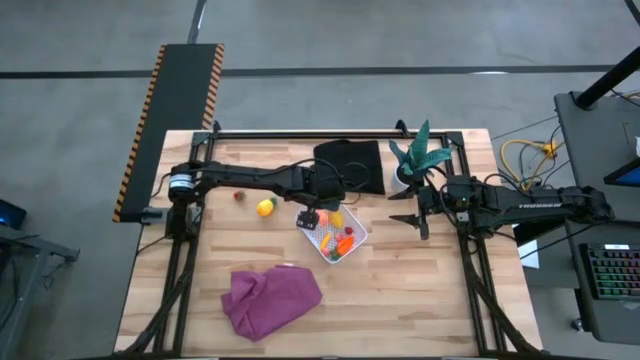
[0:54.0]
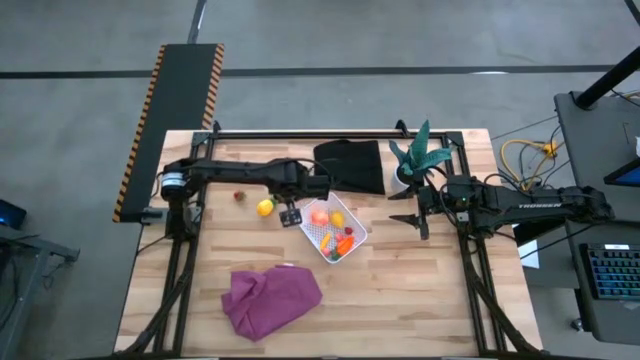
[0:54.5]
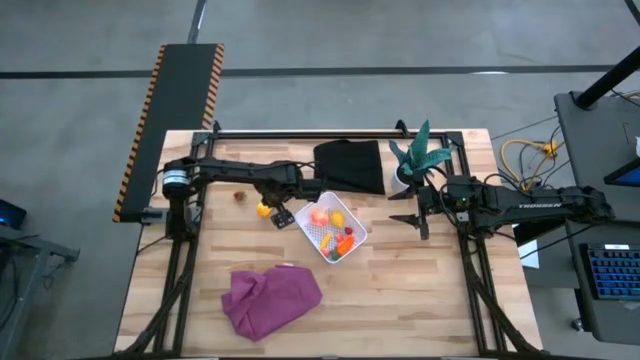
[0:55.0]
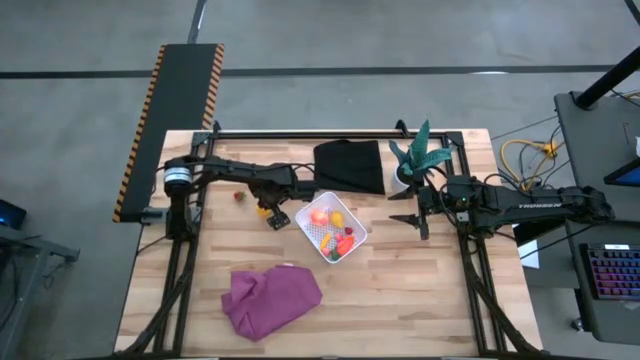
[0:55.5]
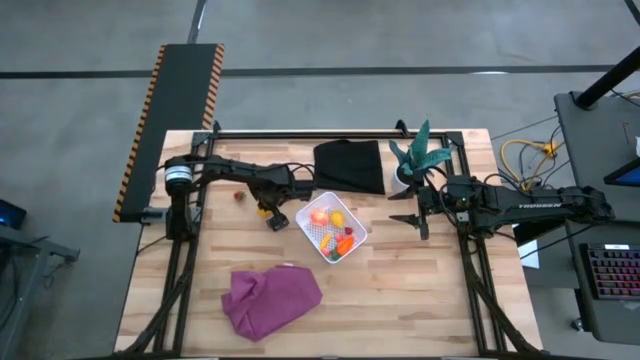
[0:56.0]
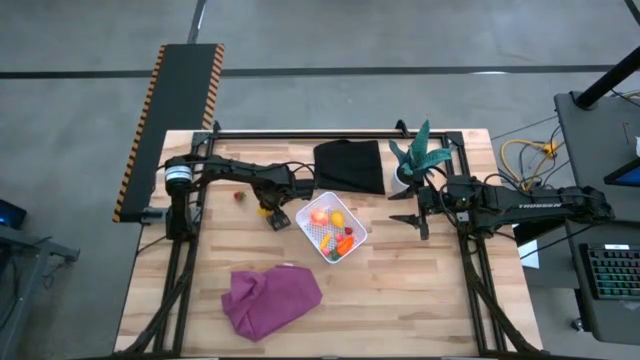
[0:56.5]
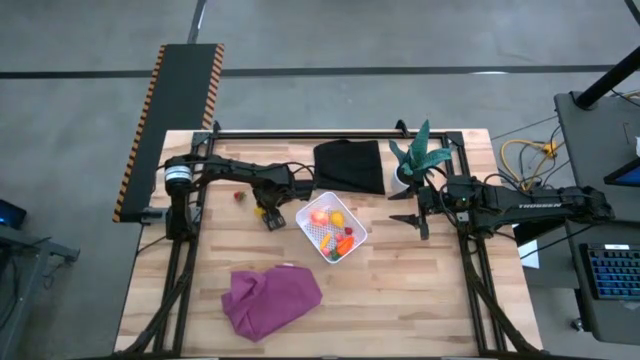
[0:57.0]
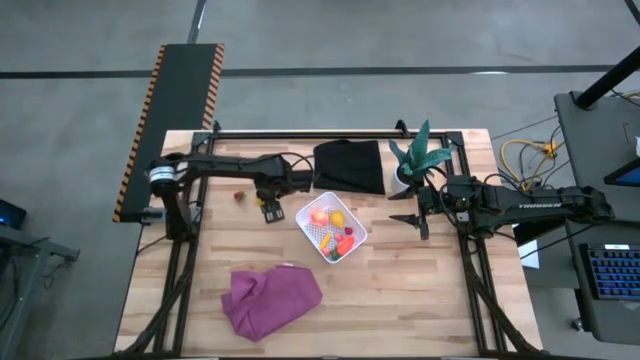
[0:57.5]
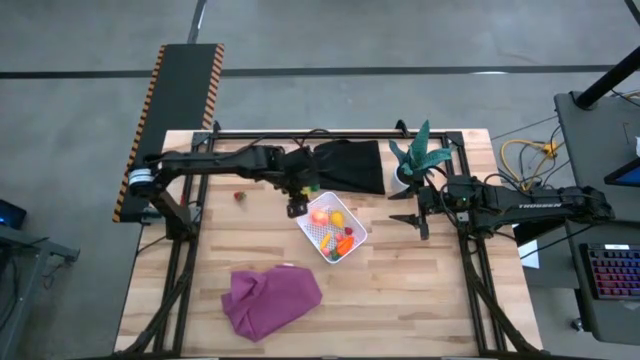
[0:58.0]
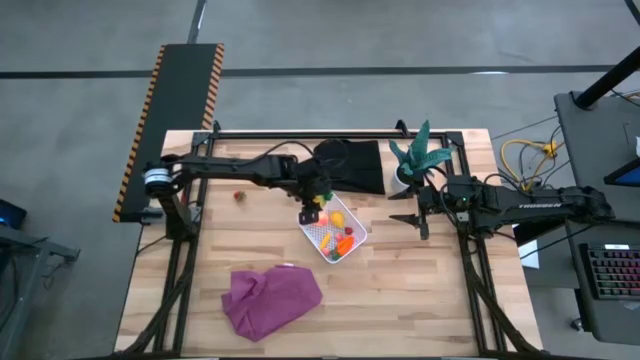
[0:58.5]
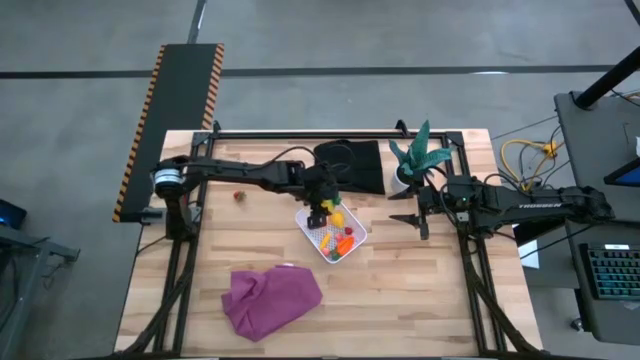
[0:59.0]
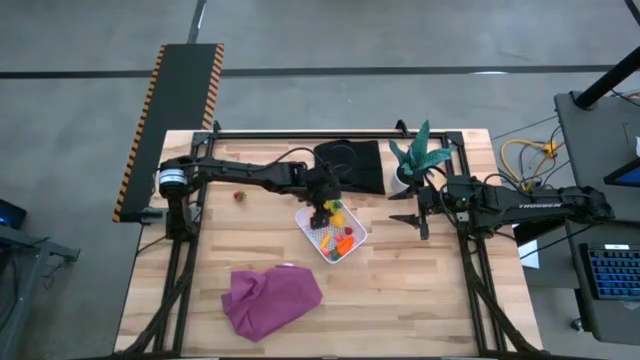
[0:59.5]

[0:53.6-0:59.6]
Task: Pick and placing Produce into tupperware
Put the pineapple into the white bin

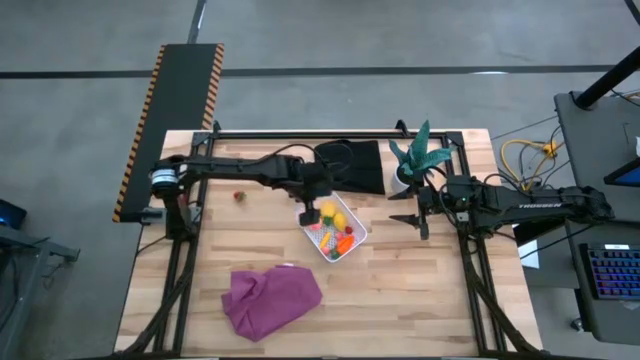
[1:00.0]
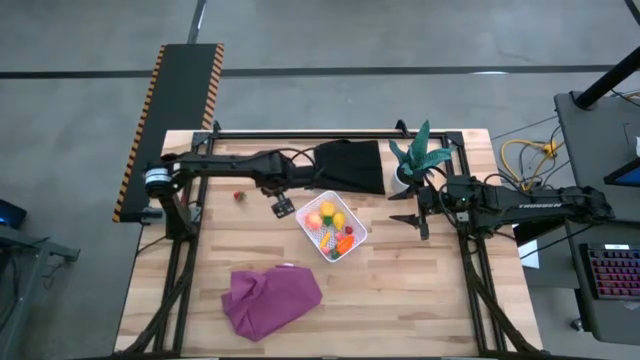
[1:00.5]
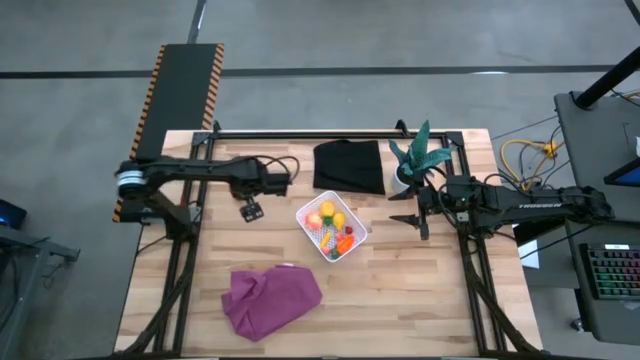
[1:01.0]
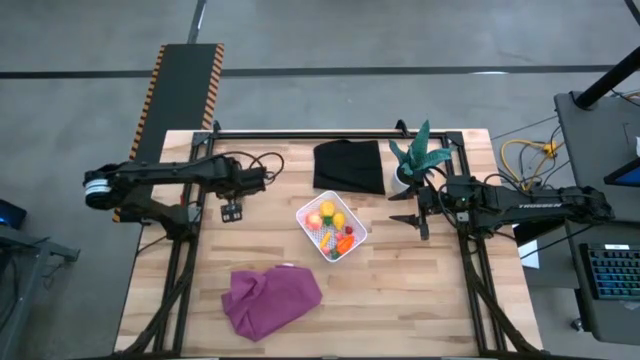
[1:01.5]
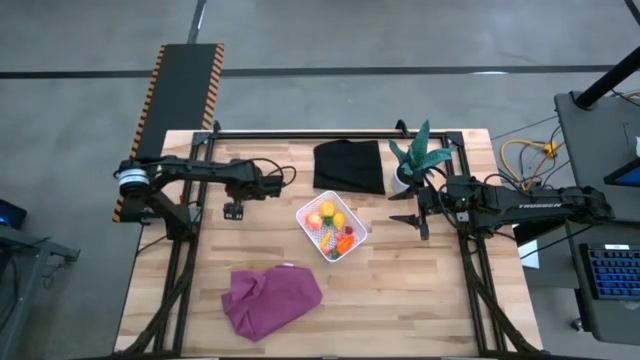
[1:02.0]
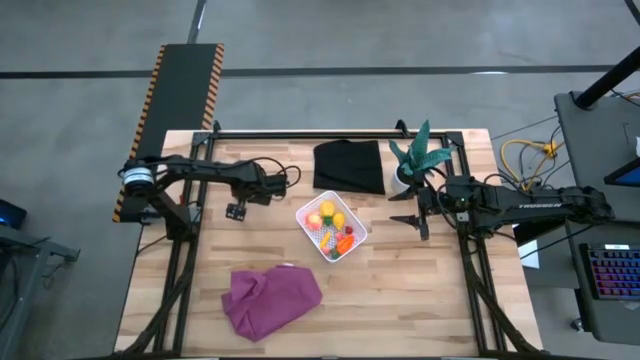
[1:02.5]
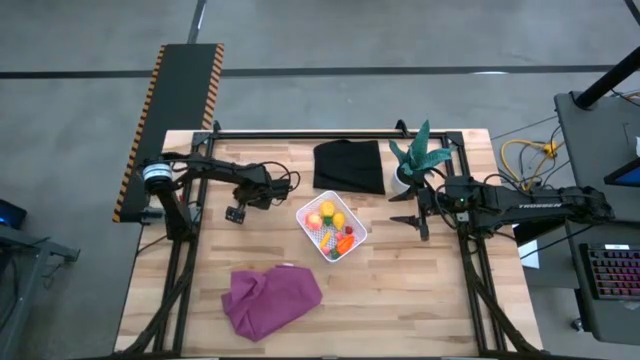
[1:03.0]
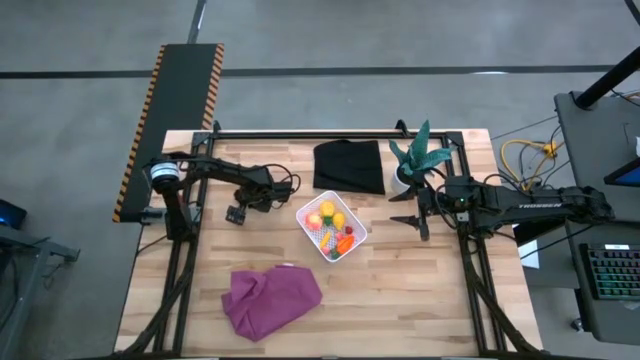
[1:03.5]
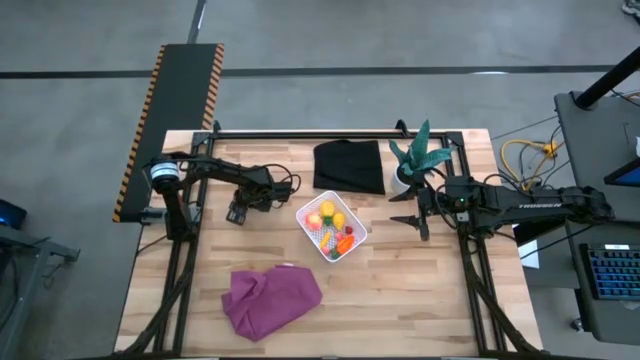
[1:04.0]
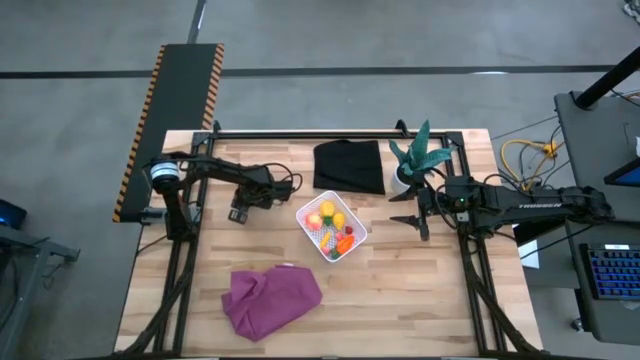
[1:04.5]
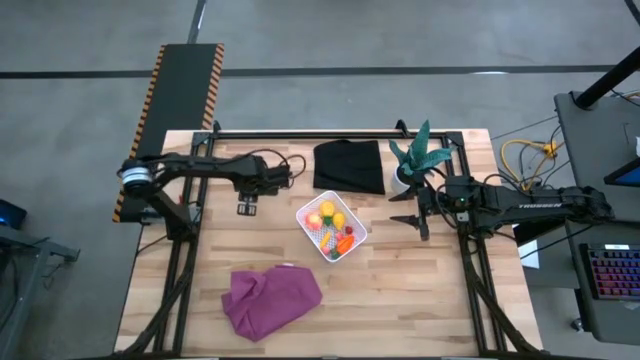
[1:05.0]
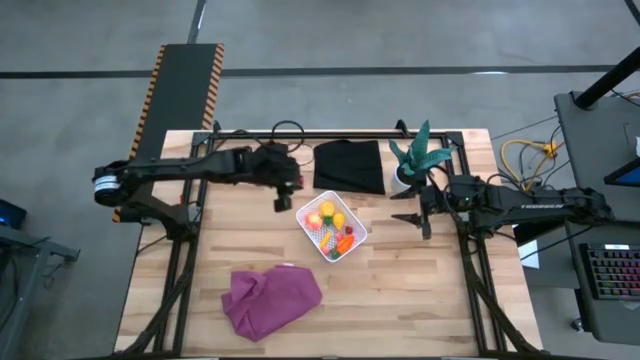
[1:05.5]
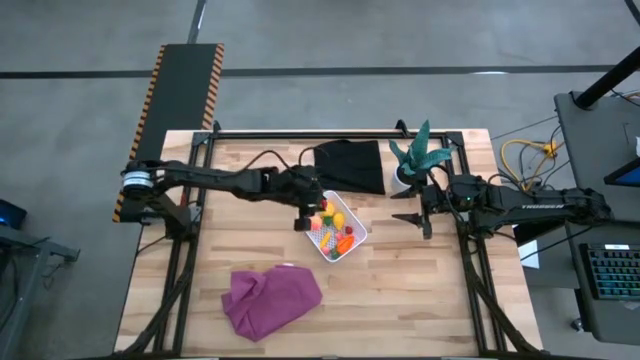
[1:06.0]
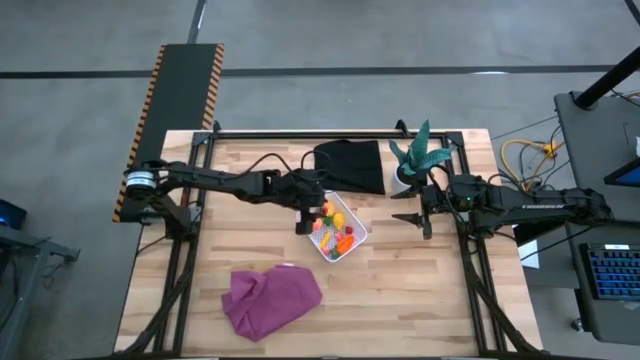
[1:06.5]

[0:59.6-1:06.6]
Put the strawberry into the white bin

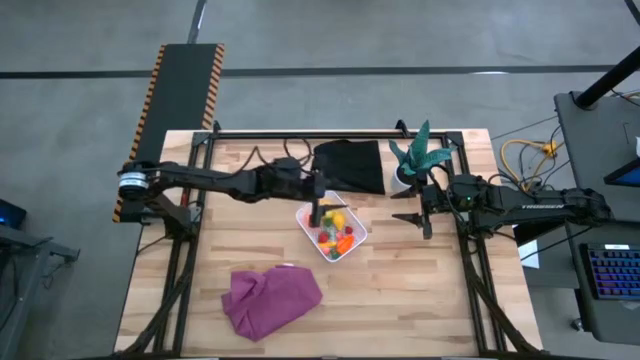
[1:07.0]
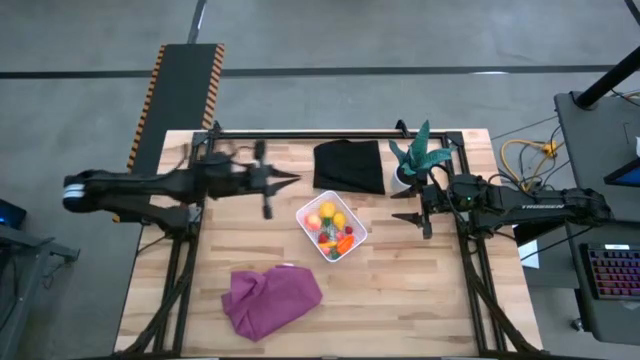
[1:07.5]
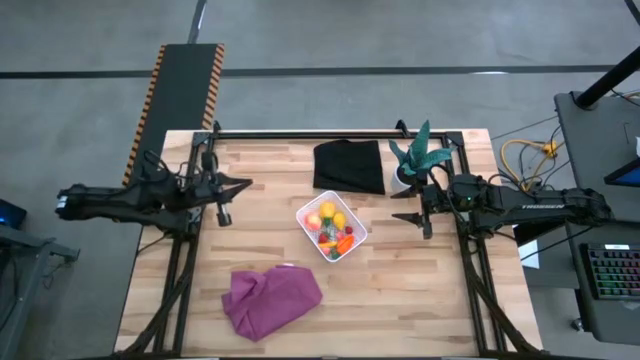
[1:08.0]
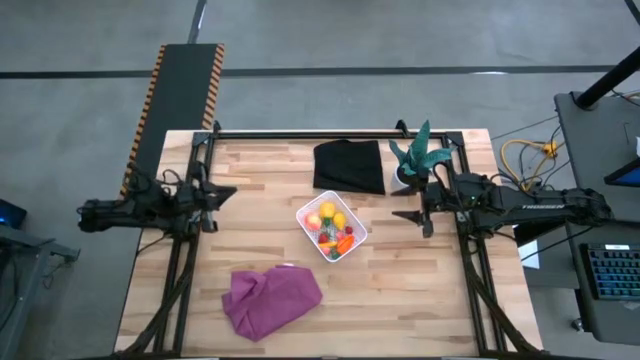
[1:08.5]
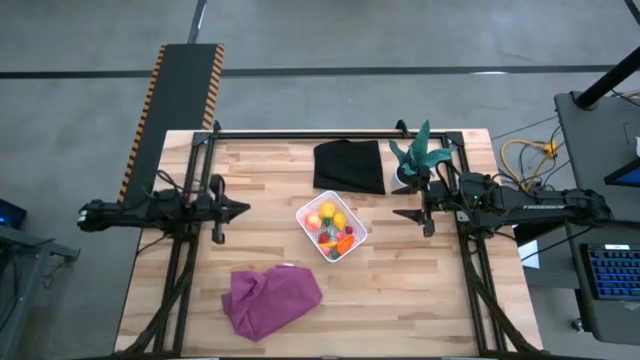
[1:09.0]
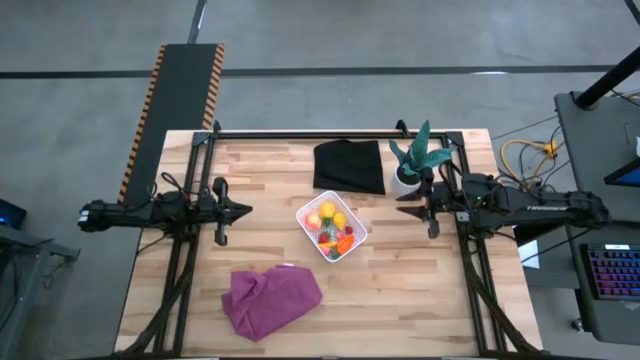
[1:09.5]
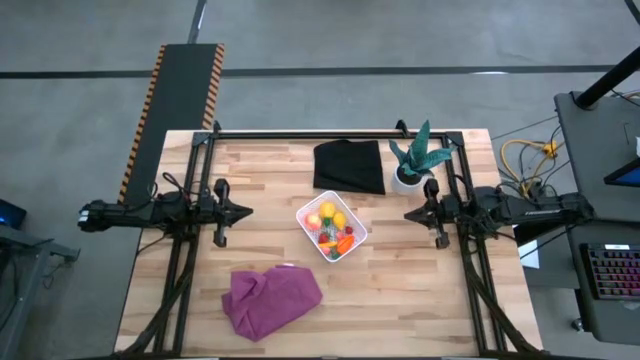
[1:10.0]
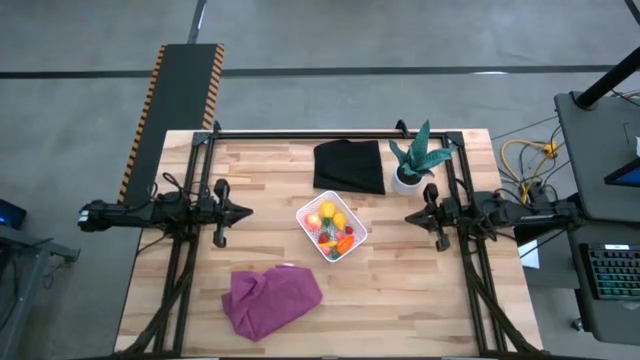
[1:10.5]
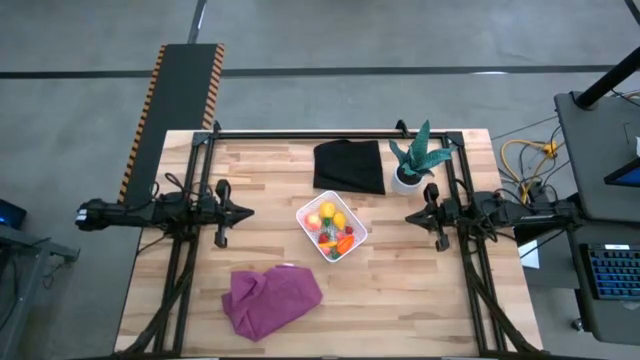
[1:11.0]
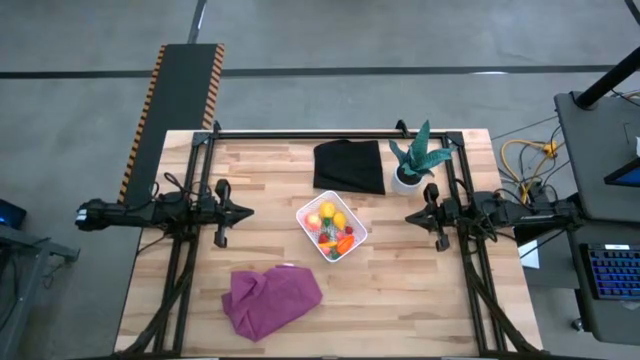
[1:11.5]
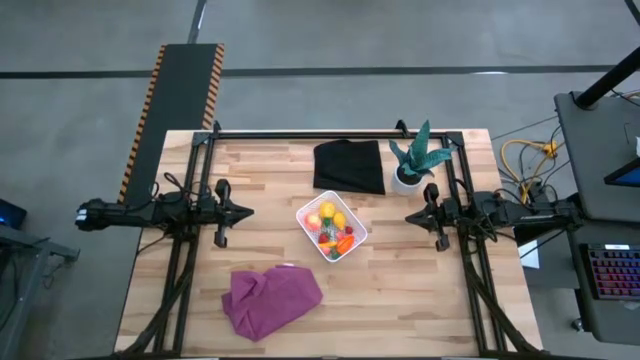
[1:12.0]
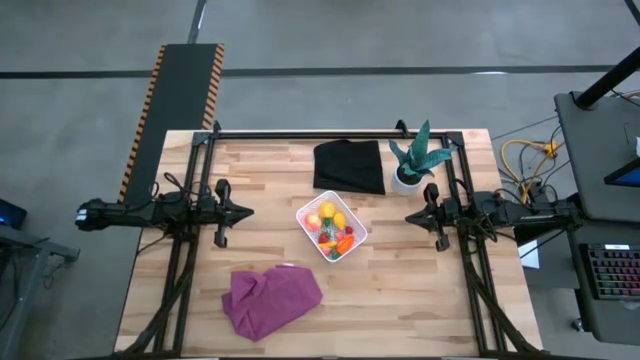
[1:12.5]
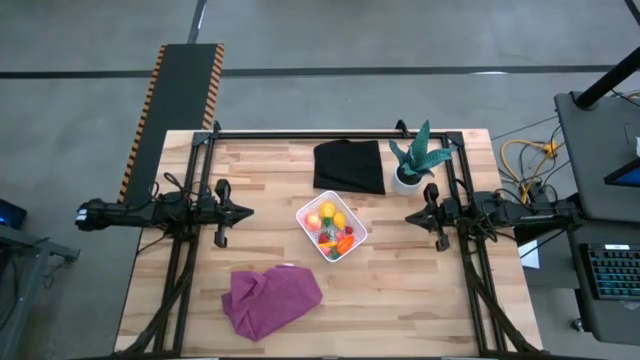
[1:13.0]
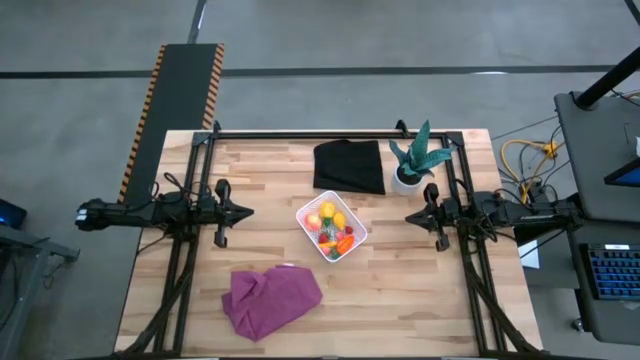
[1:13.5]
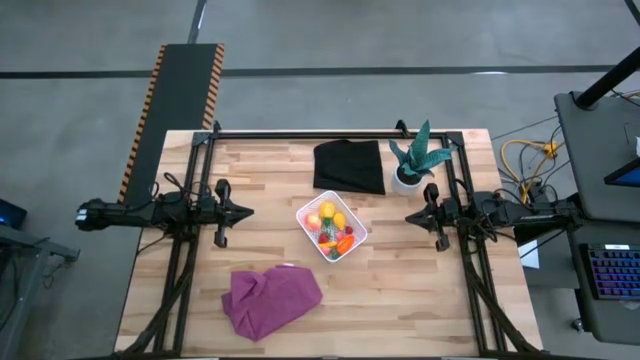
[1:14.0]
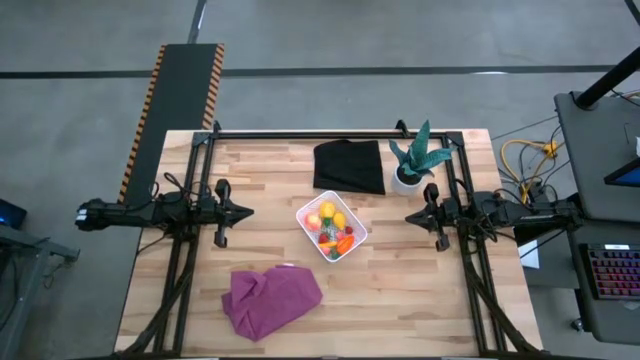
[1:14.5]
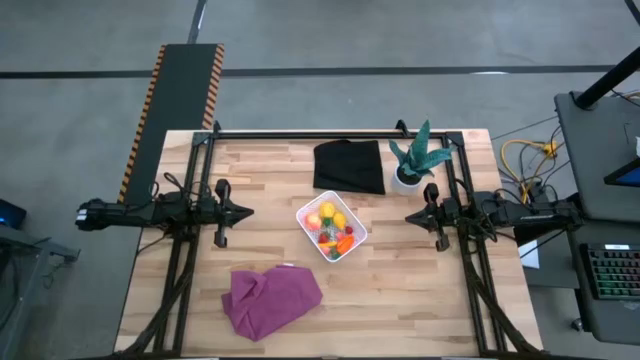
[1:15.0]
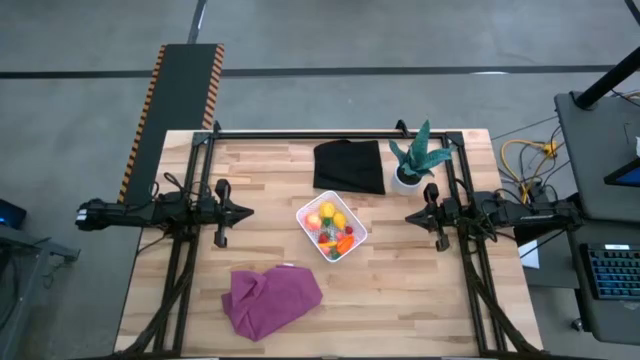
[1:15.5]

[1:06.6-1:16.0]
Return to Home Position
